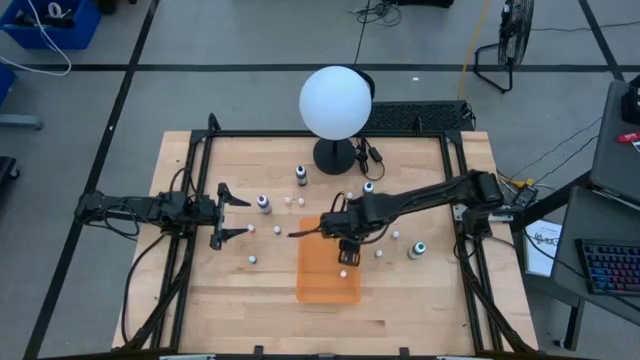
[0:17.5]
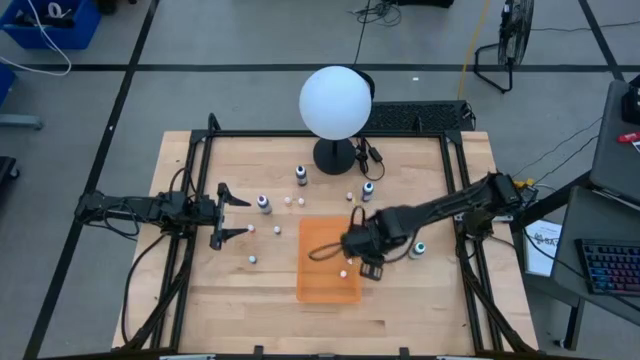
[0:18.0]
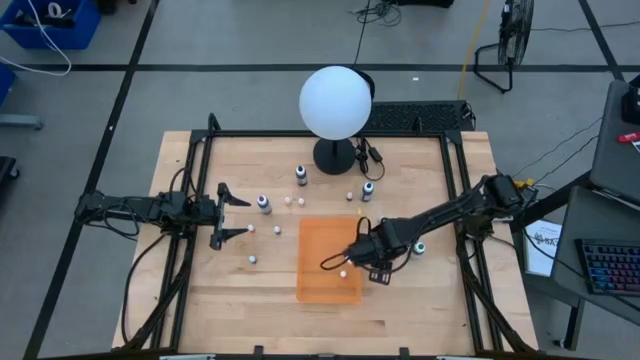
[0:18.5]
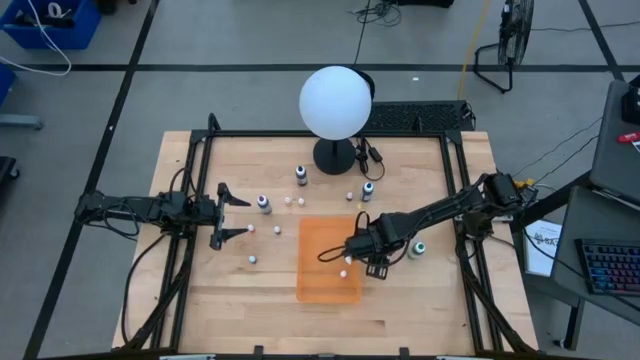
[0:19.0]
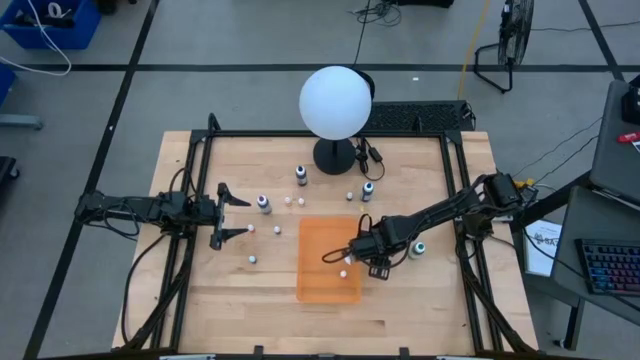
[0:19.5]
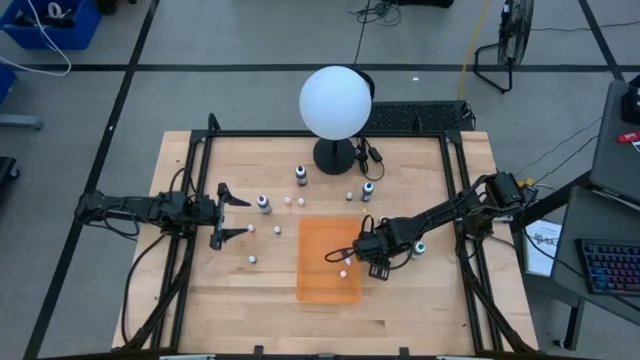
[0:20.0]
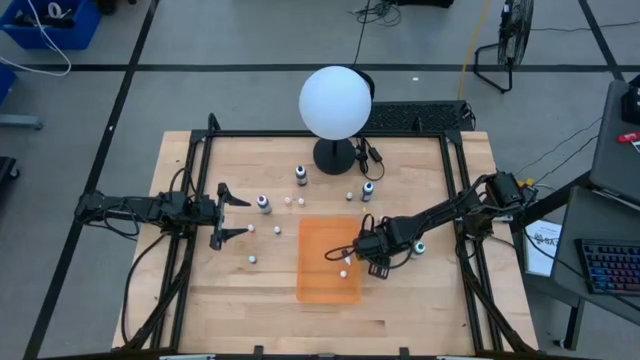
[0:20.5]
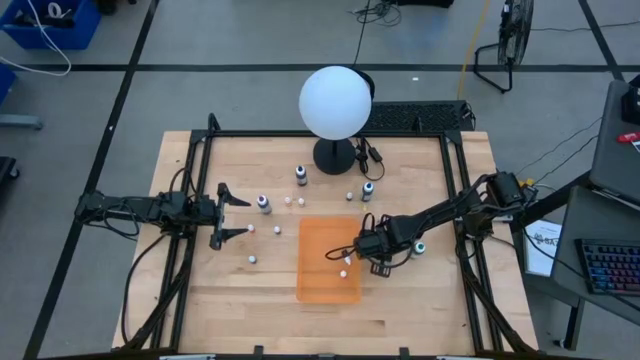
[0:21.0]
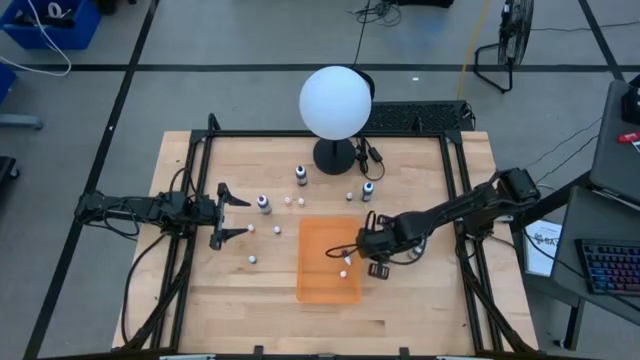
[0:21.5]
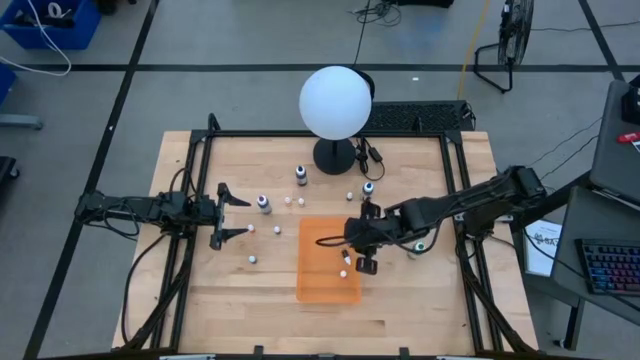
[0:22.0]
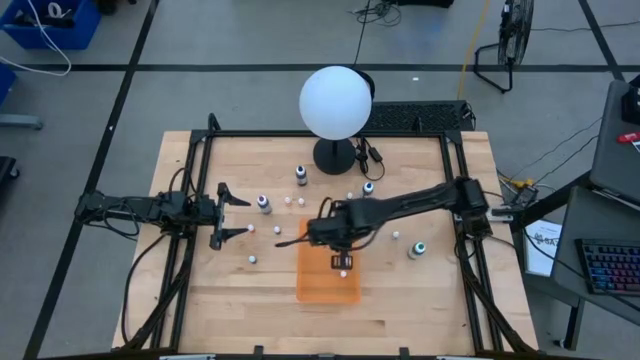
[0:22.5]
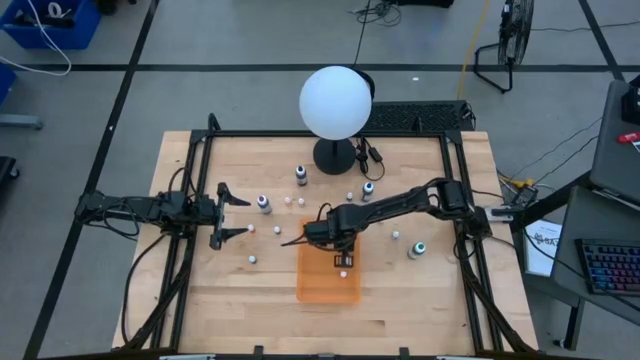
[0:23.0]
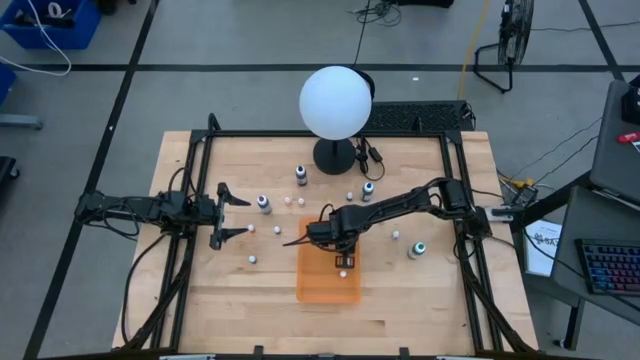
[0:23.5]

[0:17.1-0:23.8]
Task: Pick & Place food coloring
Put the small purple food coloring bottle into the orange bin

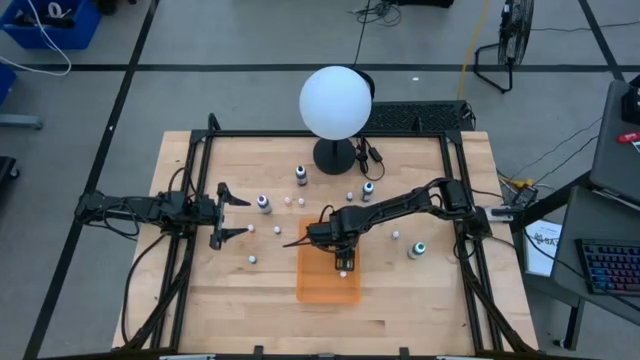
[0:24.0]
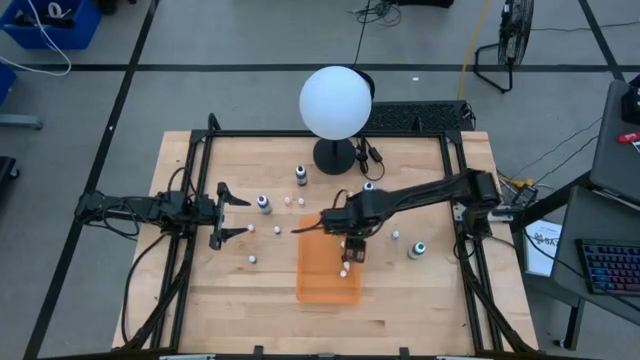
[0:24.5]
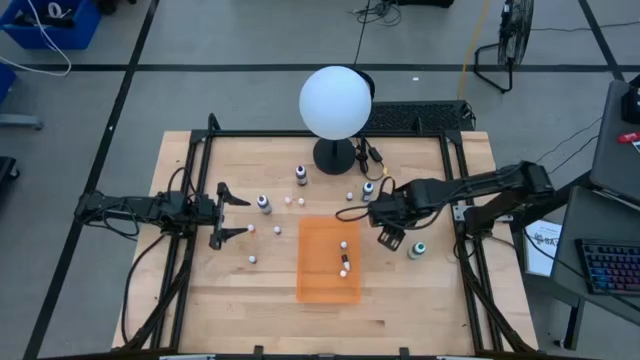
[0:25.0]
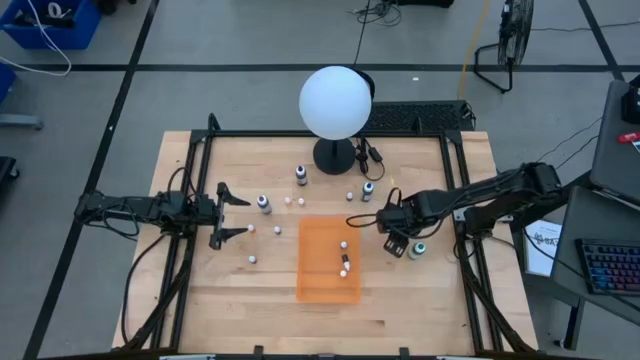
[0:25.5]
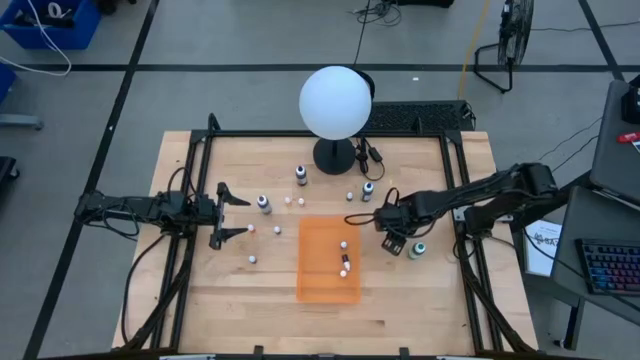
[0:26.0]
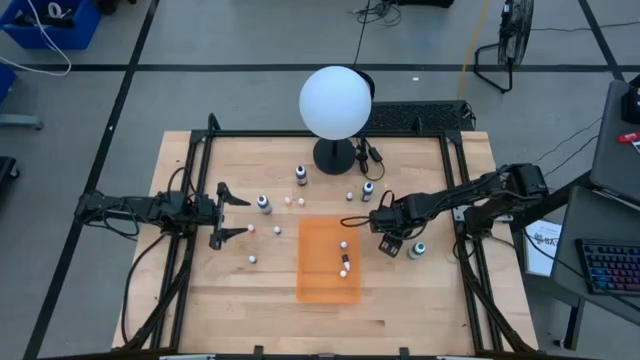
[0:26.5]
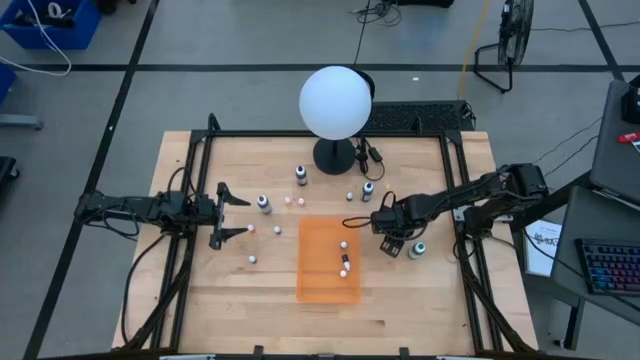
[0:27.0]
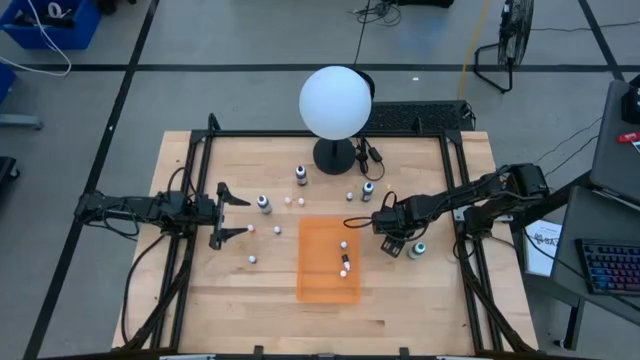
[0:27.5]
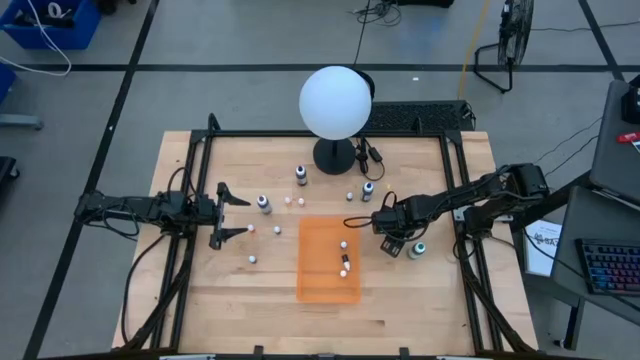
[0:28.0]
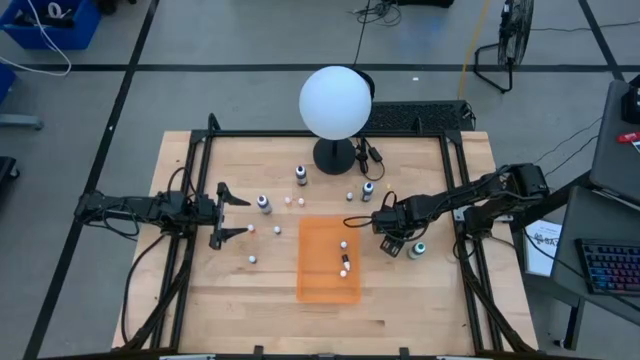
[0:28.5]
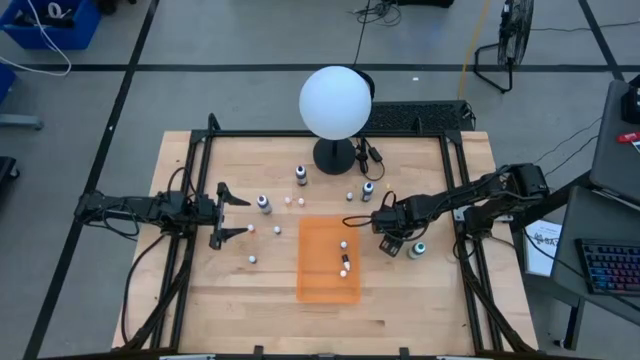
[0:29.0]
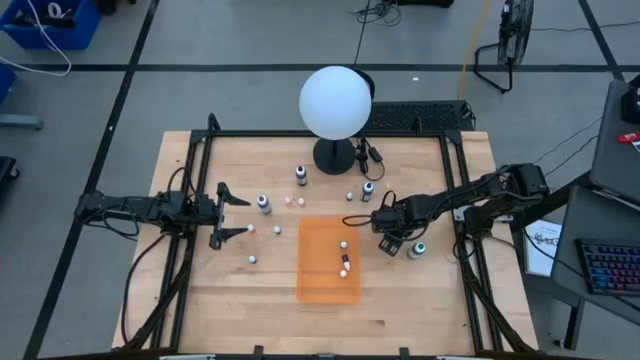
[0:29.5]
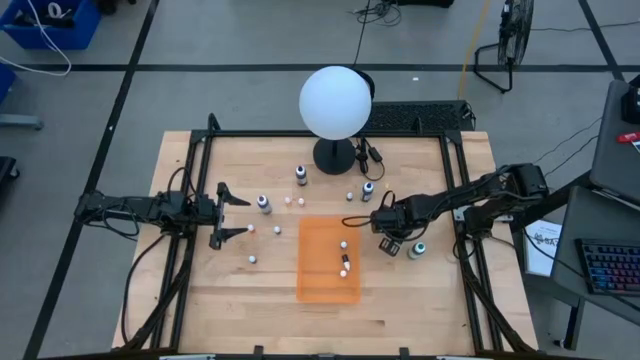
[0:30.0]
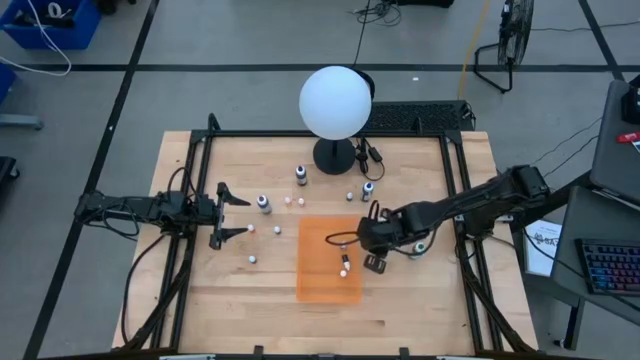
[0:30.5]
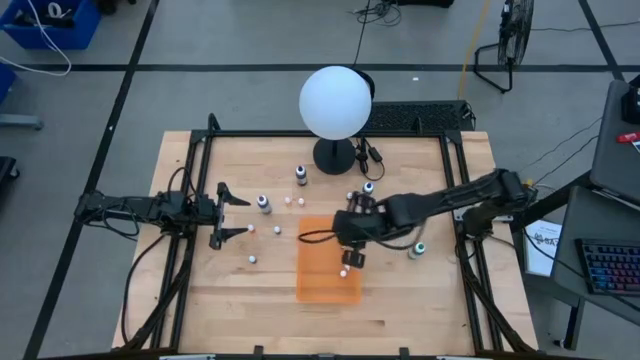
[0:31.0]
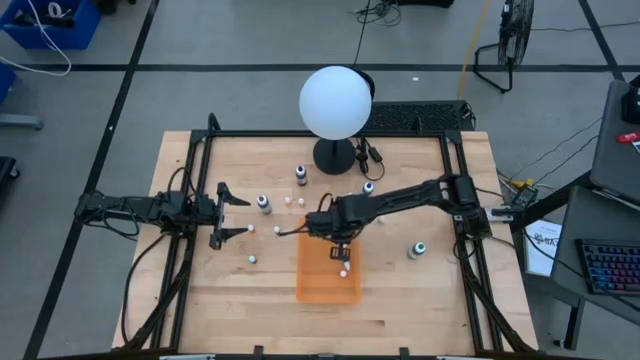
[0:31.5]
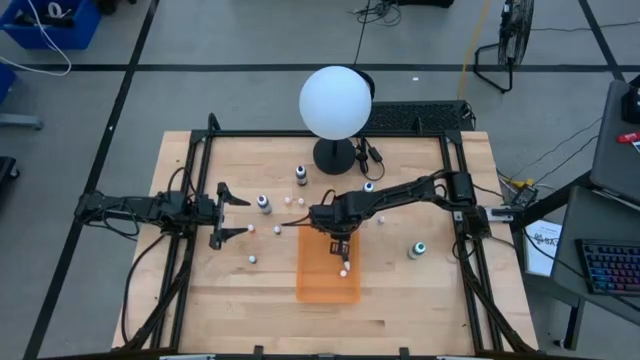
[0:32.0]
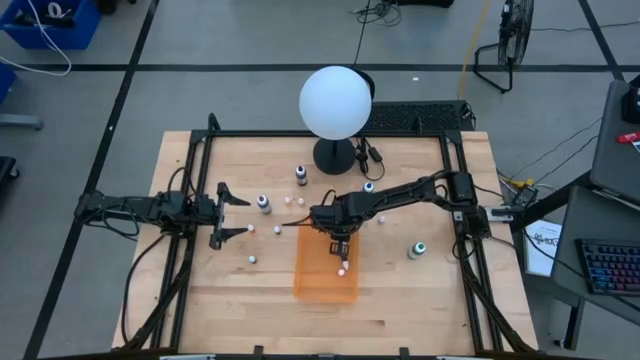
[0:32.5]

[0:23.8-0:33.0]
Put the small purple food coloring bottle into the orange bin

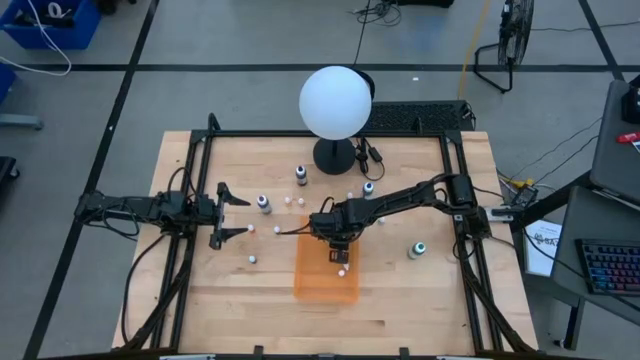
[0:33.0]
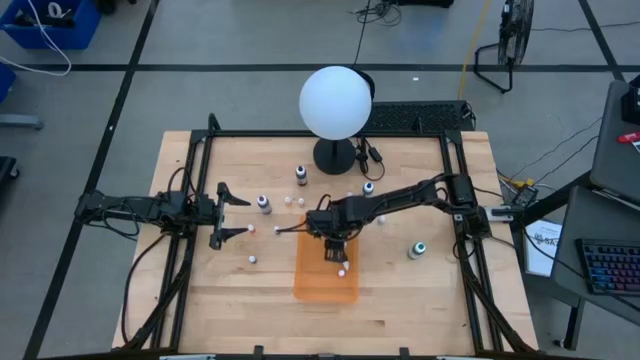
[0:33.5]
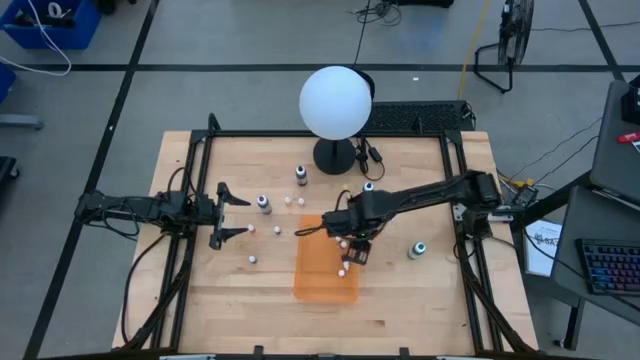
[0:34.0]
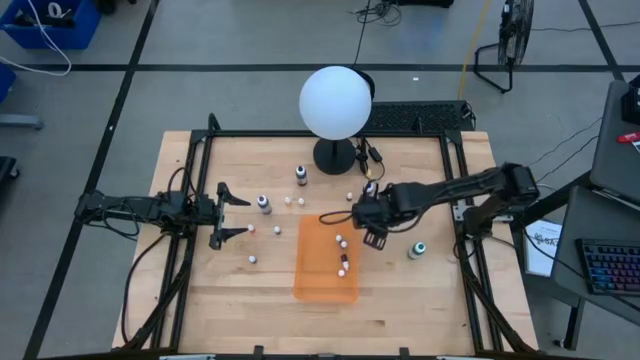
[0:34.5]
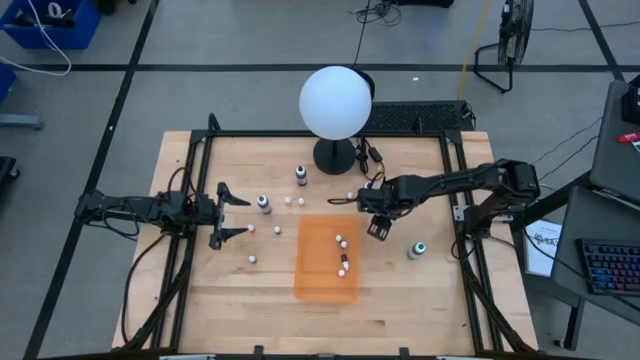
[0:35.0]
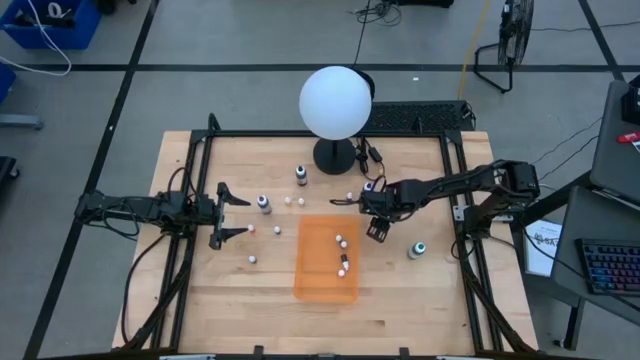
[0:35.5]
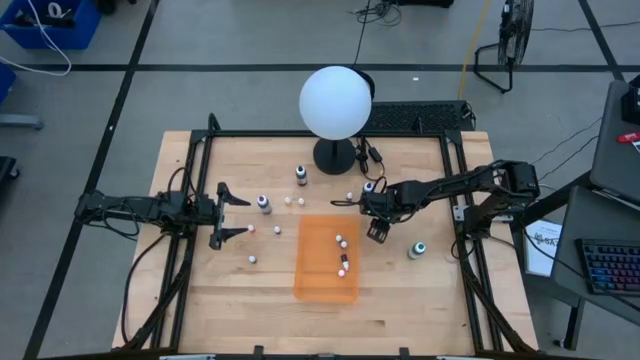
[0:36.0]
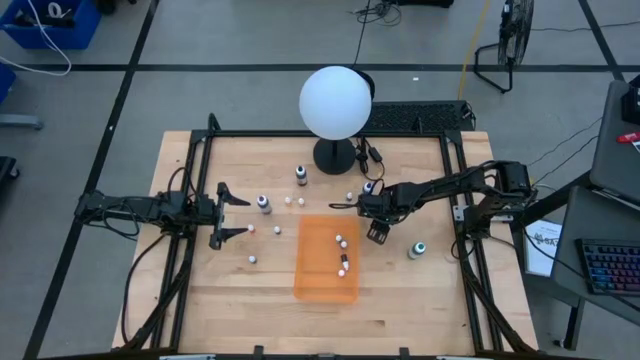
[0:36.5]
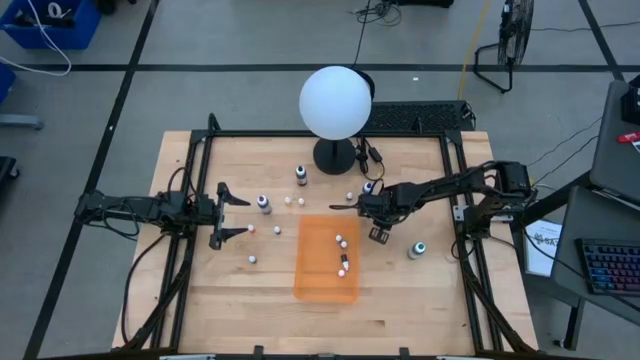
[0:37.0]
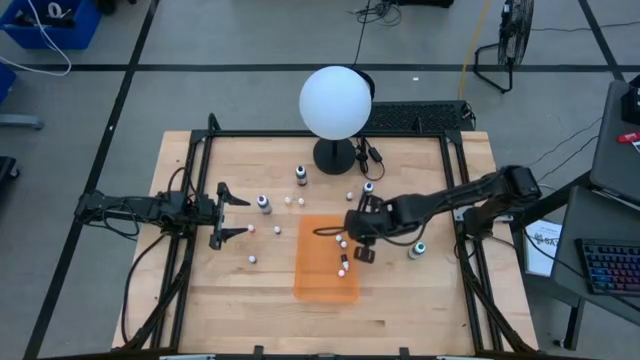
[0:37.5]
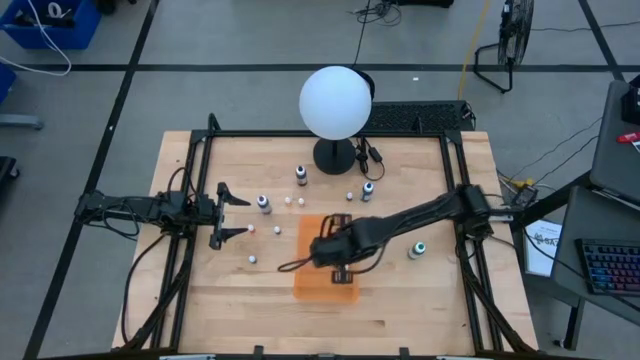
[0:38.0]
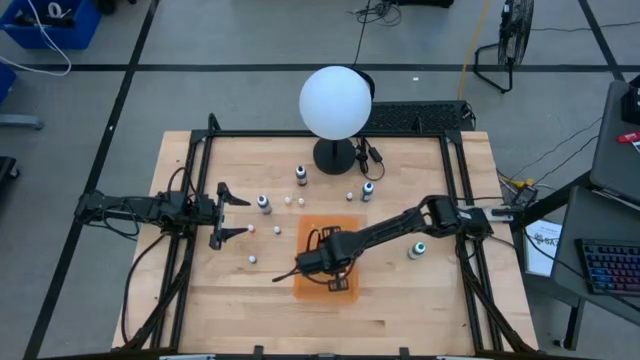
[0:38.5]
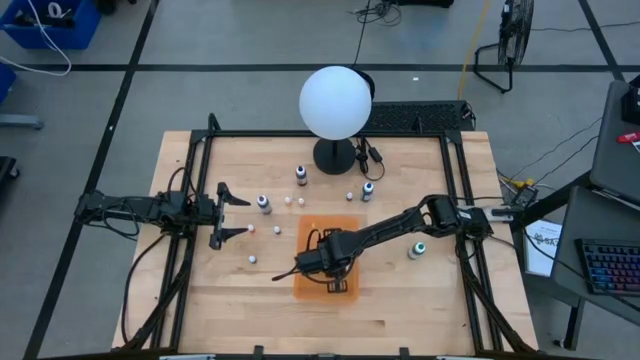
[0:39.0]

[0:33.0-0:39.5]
Put the small green food coloring bottle into the orange bin
